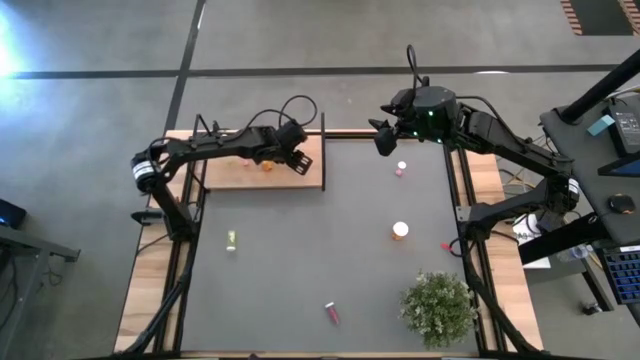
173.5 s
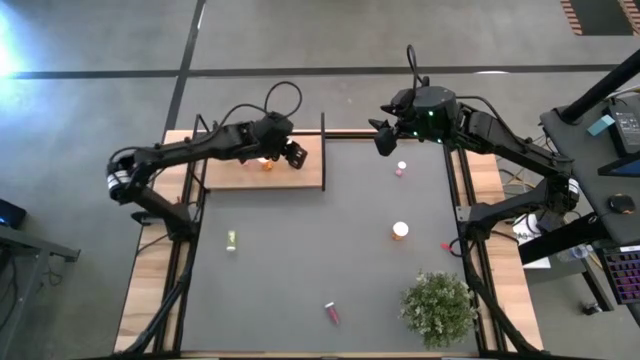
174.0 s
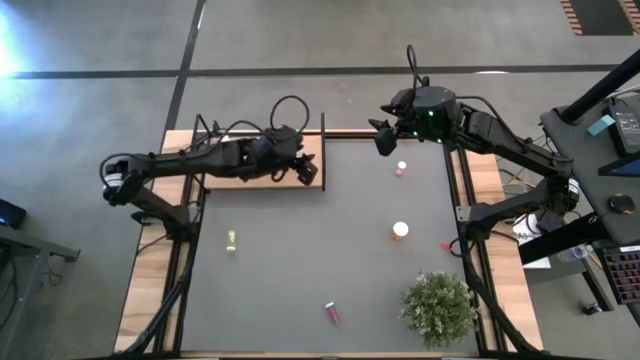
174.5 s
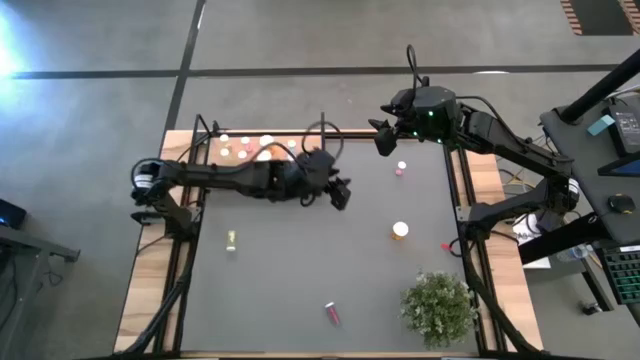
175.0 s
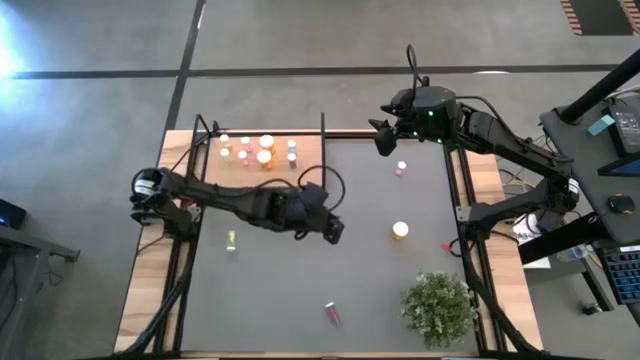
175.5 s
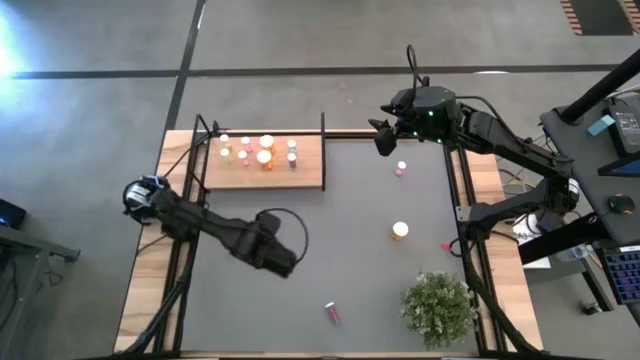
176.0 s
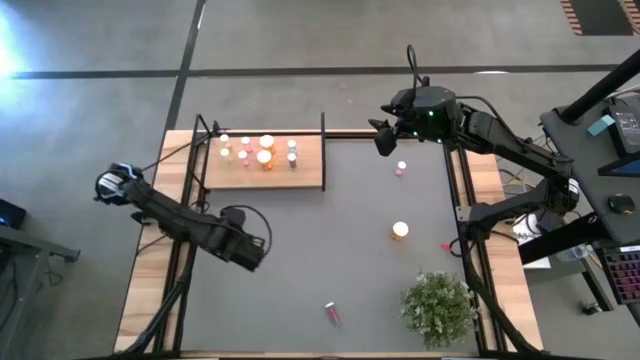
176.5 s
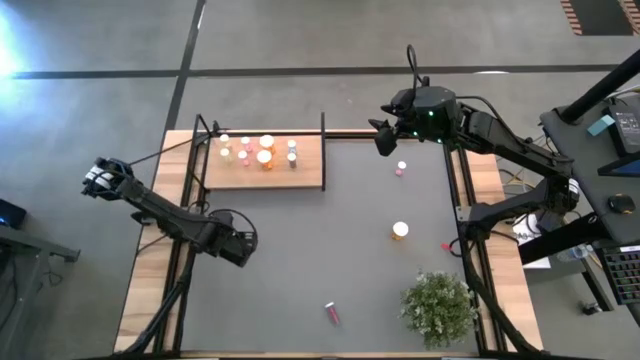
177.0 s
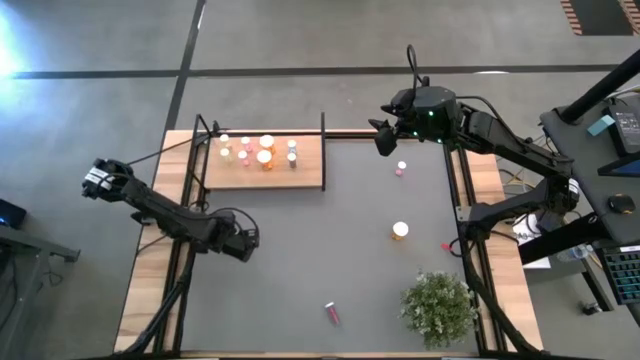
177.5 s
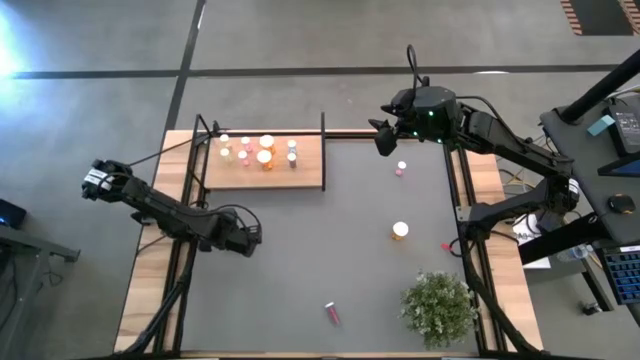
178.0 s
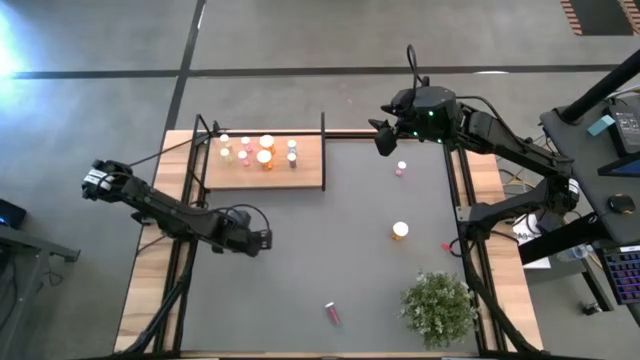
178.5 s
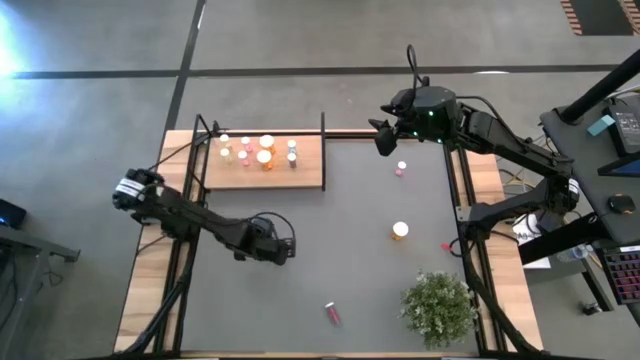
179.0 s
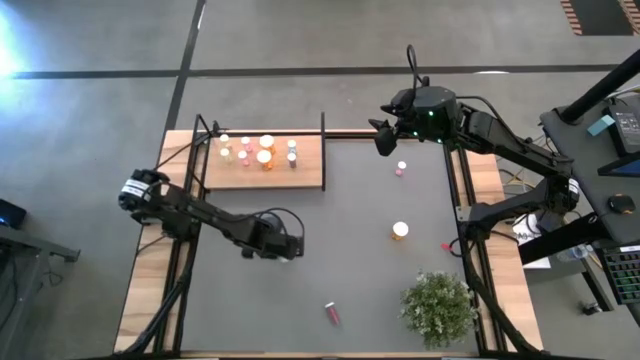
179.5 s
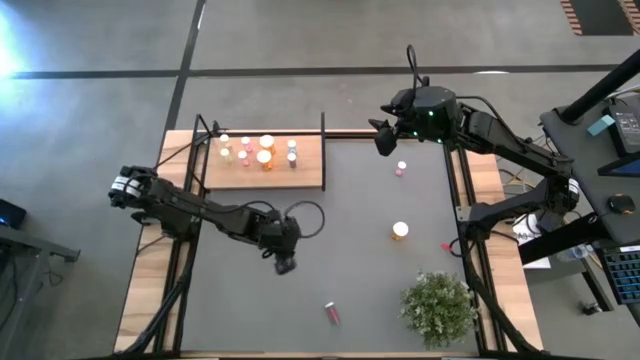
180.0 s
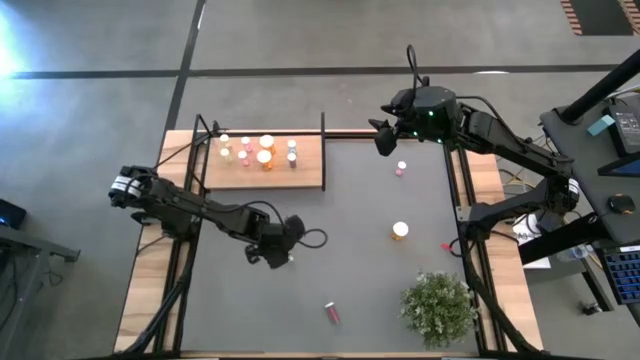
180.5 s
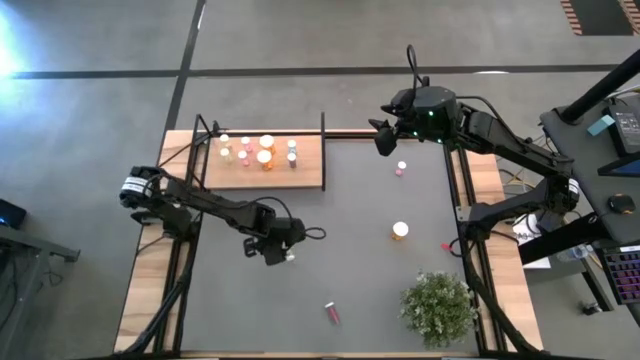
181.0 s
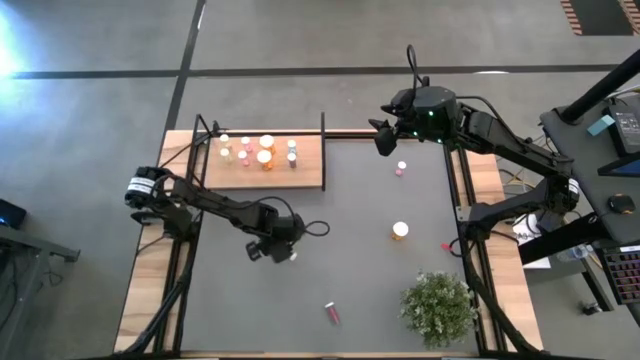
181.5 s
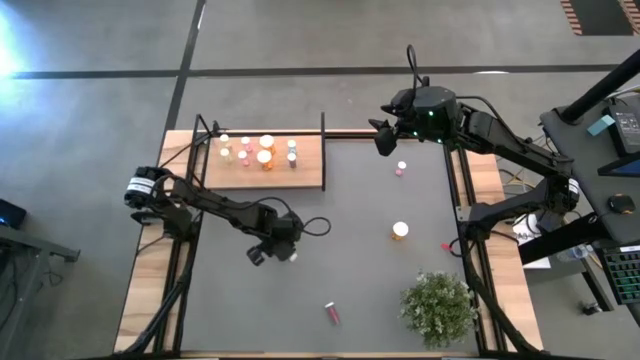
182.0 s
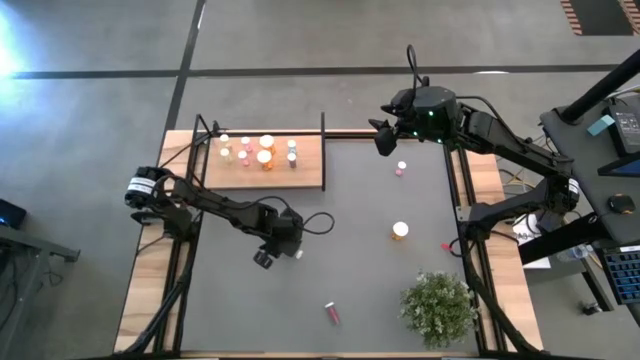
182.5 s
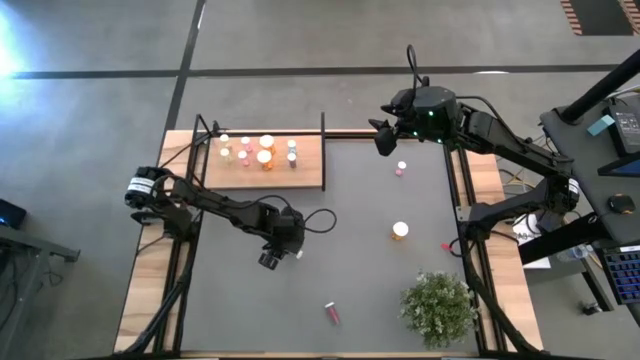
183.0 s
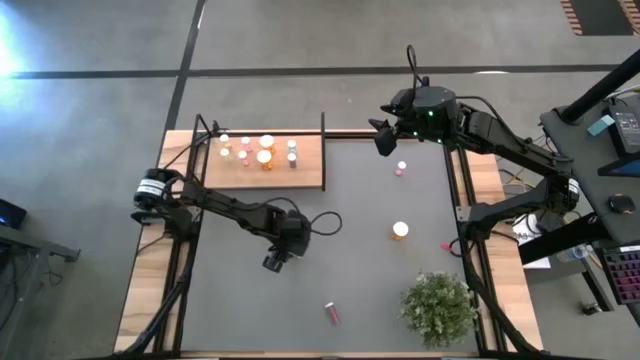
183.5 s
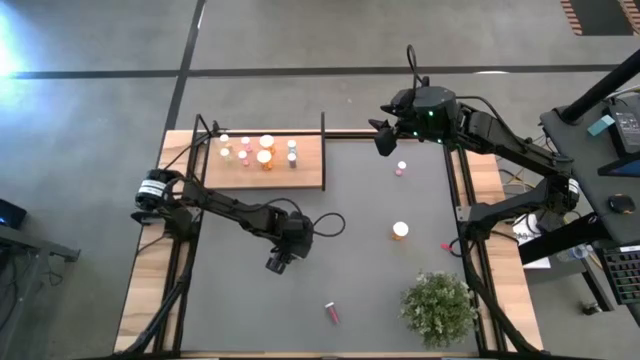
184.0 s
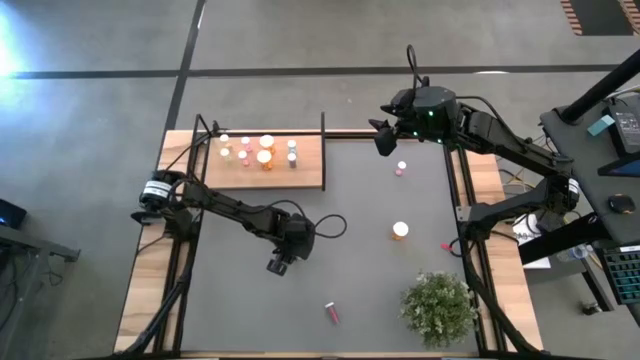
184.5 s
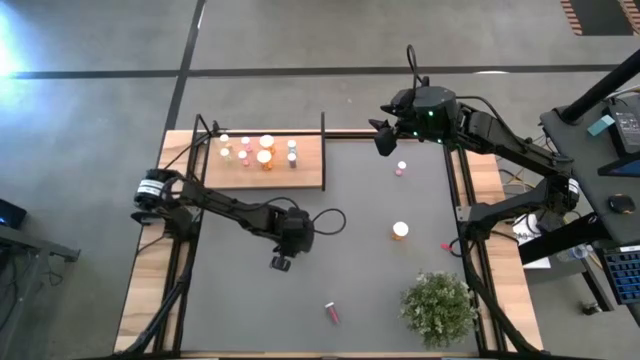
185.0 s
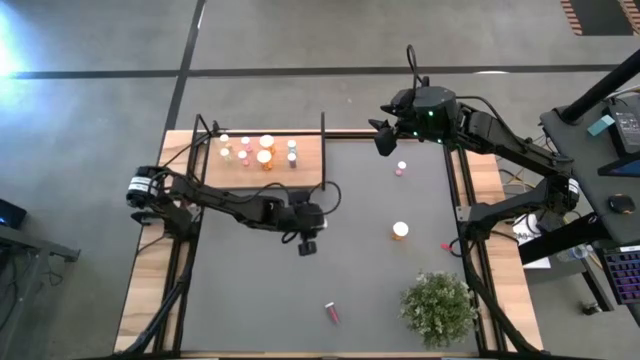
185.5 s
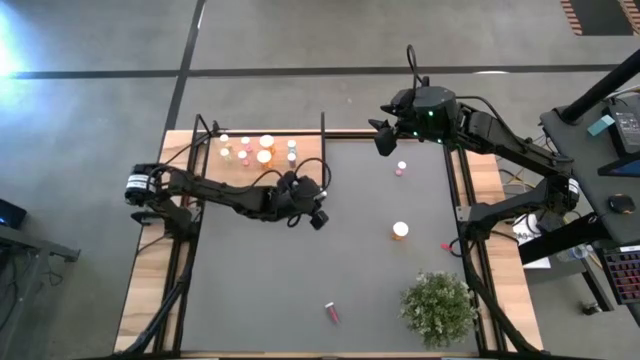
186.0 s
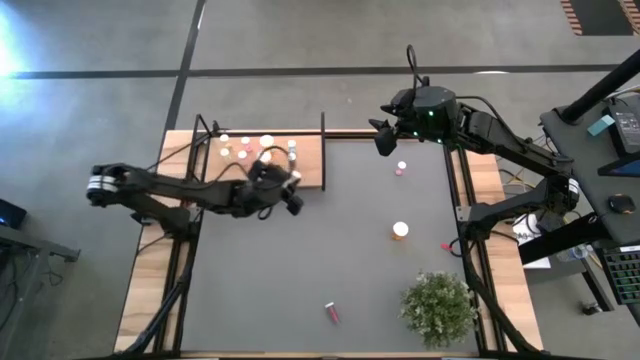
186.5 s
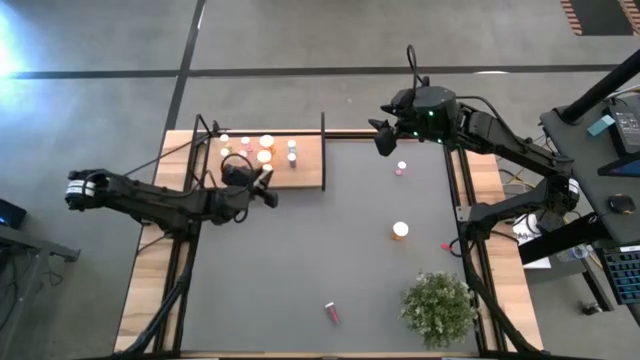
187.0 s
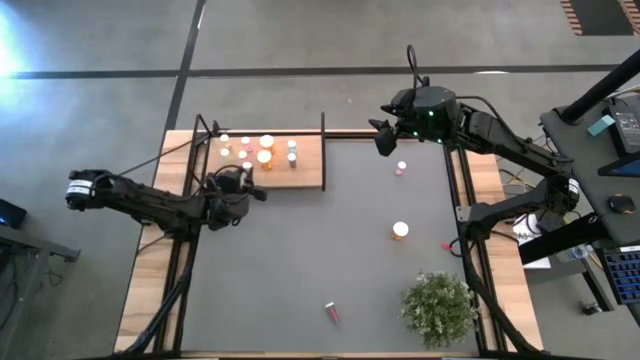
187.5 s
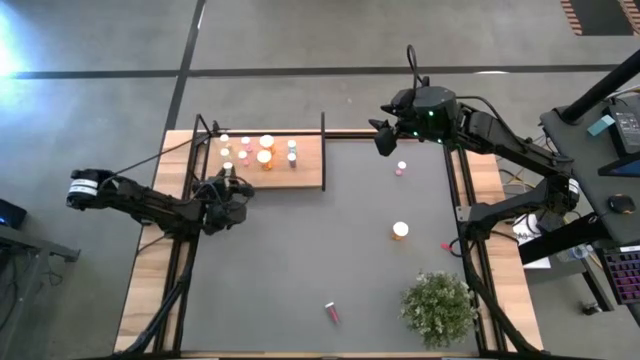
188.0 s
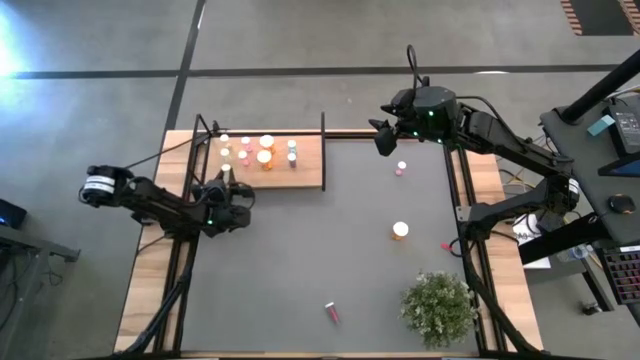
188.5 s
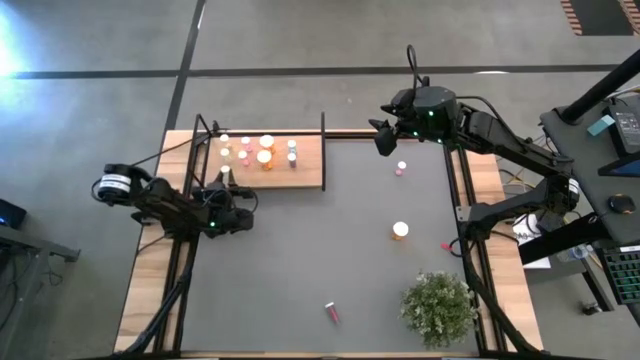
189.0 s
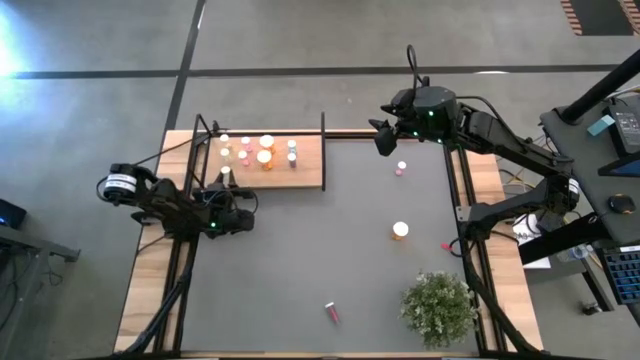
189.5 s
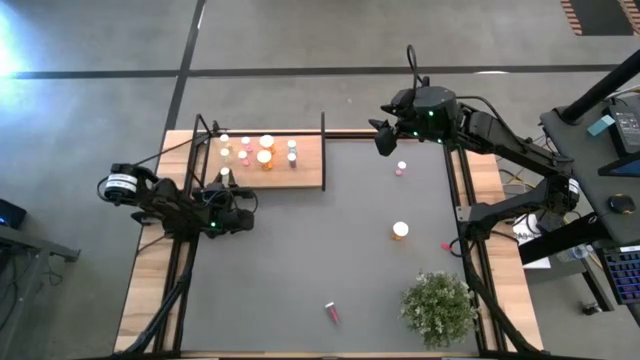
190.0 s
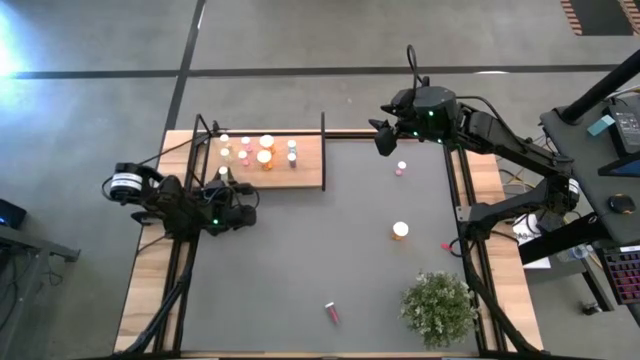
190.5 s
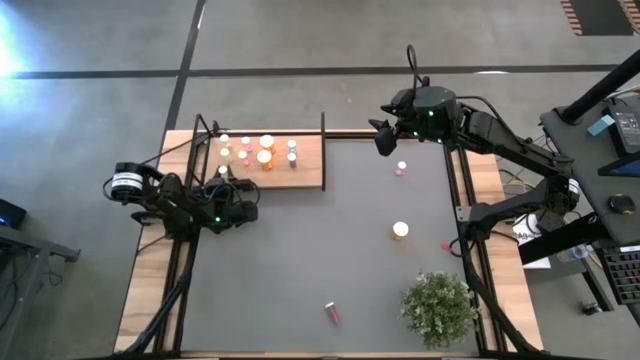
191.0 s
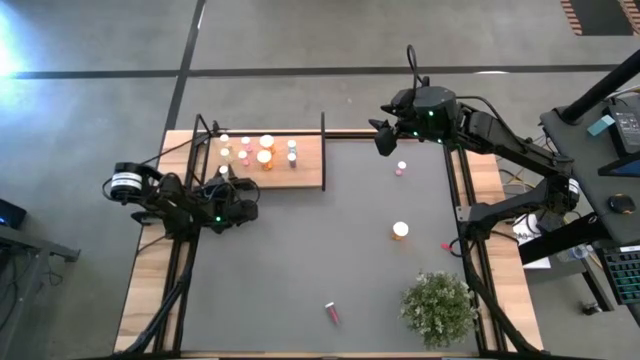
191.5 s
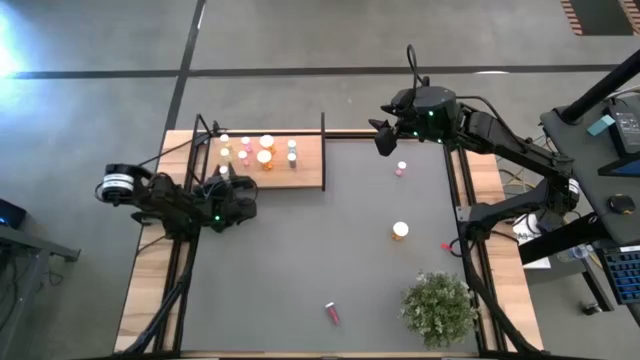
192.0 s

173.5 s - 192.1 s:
Task: Pick and place medicine bottles onto shelf by color
Put the yellow pill bottle on the shelf aligned with the other yellow pill bottles

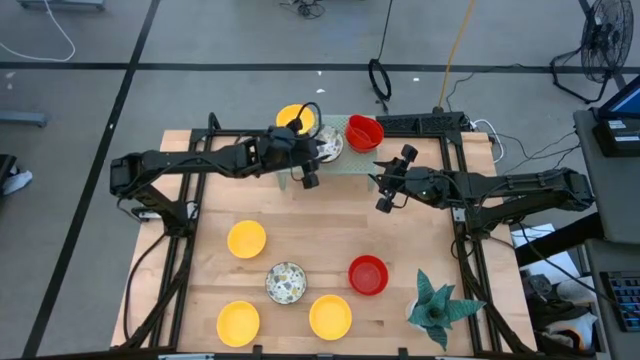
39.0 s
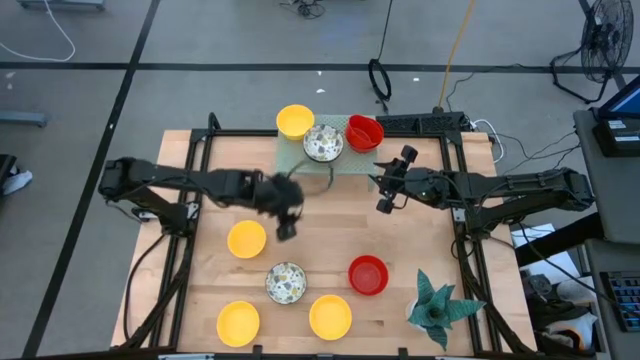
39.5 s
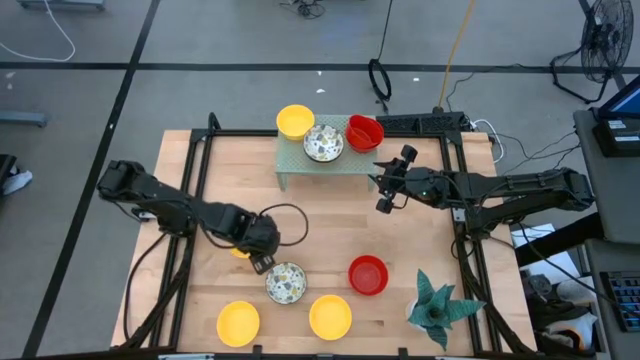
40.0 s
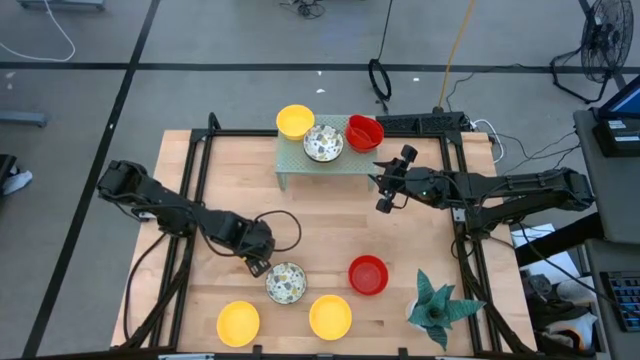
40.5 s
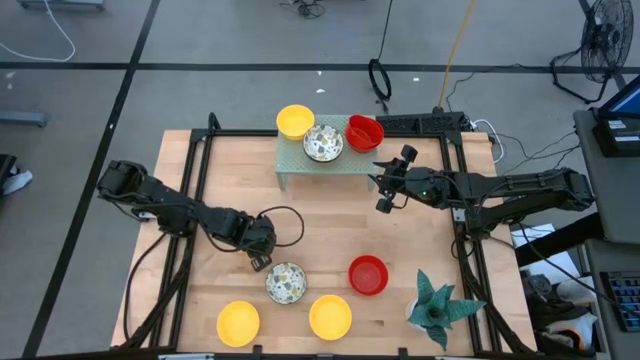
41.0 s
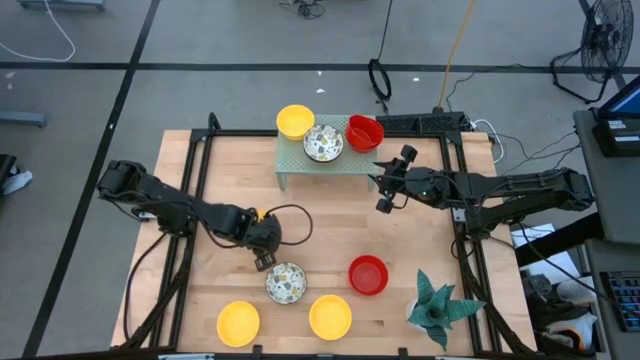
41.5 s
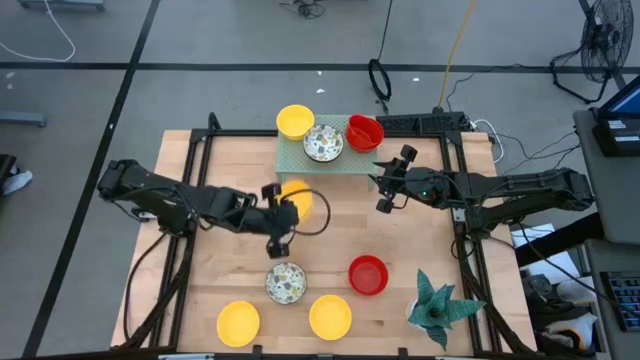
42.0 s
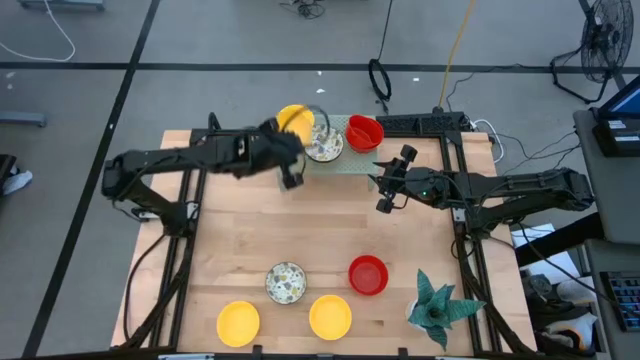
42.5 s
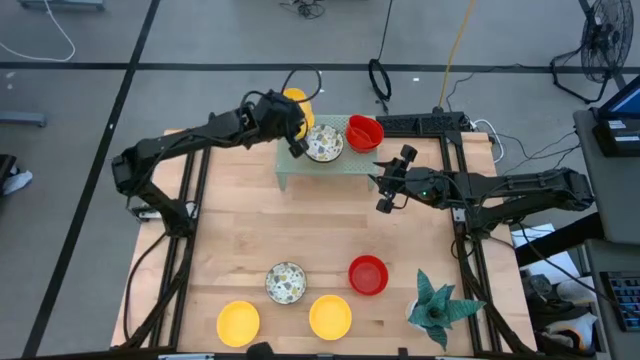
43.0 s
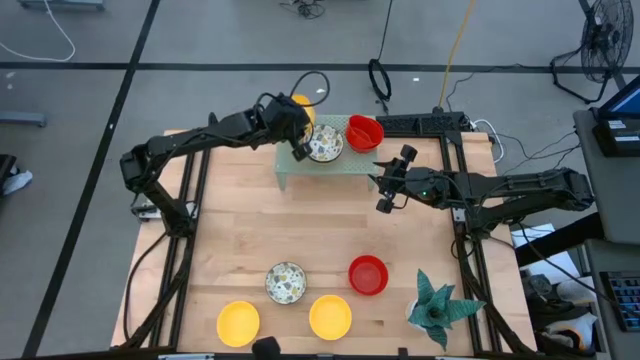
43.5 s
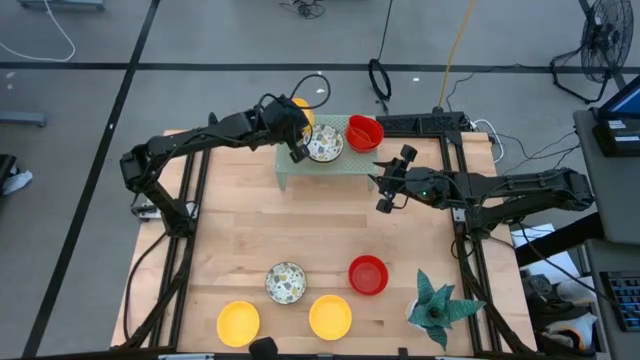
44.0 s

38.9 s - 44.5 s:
Task: Pick & Place Mini bowls
Stack the yellow bowl on top of the yellow bowl on the shelf
